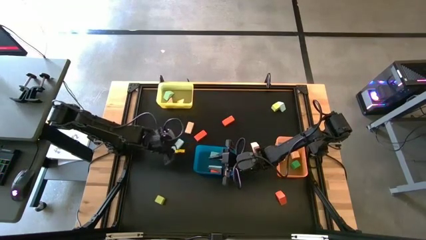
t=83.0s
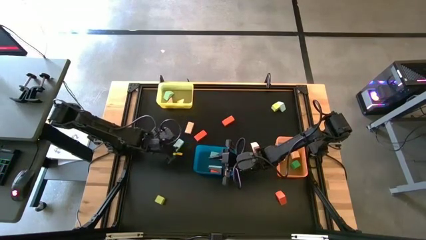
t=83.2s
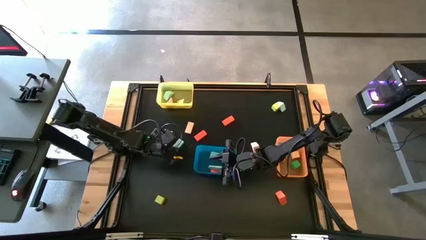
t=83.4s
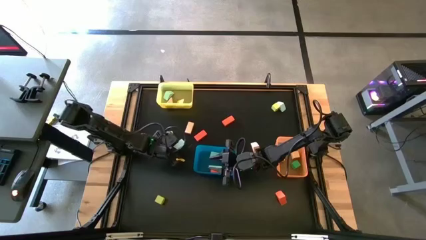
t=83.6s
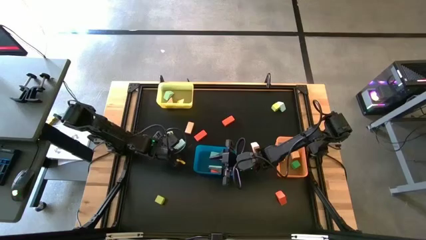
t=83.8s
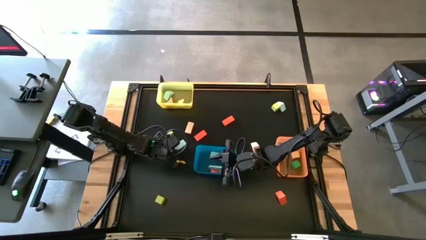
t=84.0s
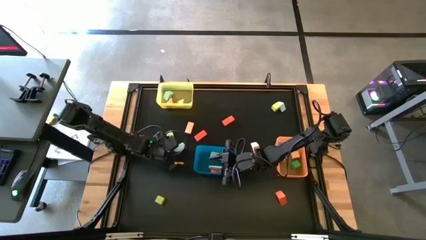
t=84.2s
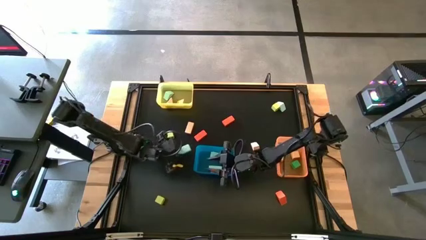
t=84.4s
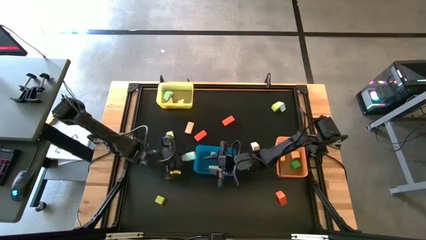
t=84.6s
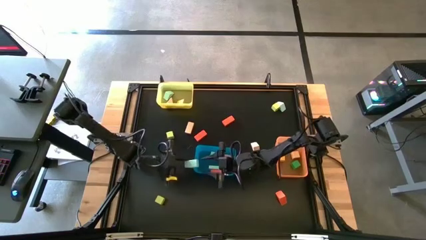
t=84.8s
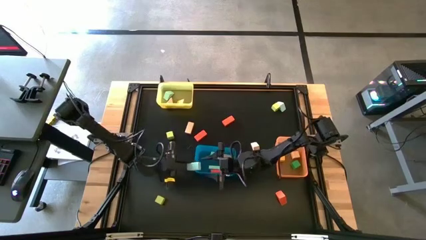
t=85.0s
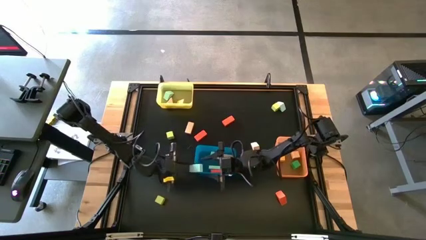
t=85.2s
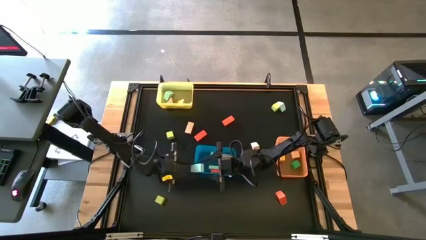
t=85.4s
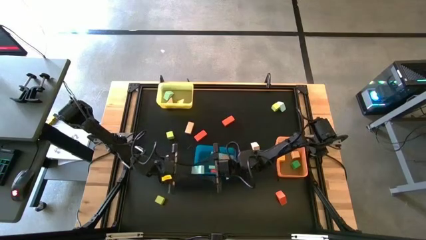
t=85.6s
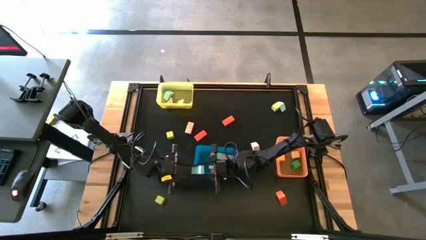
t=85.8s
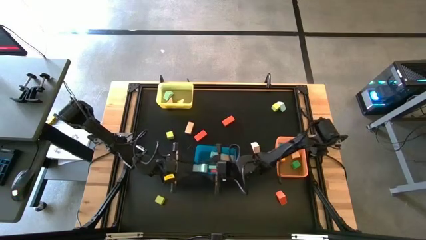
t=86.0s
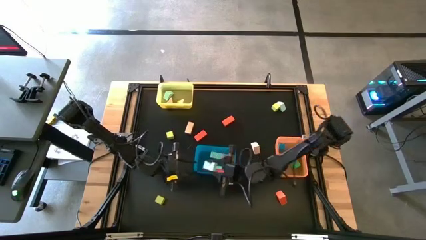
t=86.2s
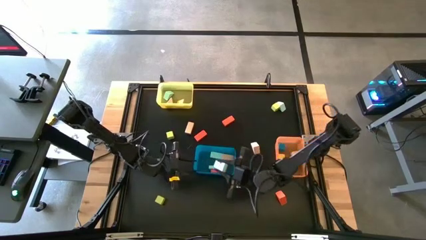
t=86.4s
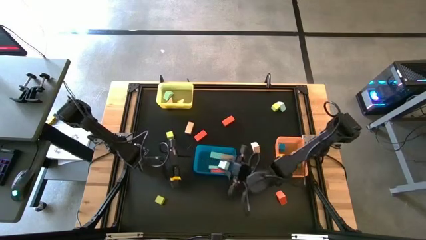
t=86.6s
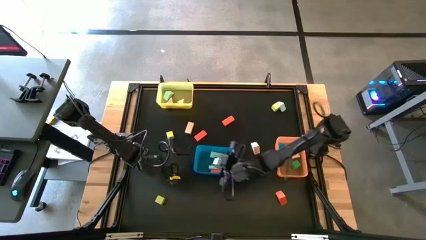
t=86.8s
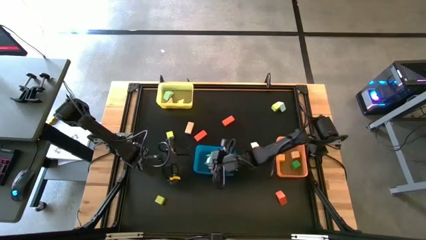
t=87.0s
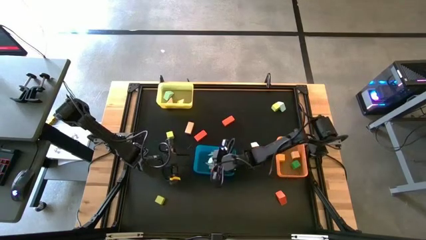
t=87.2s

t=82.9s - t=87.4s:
Task: Sort blocks by size
Put the light blue rectangular block into the blue bin

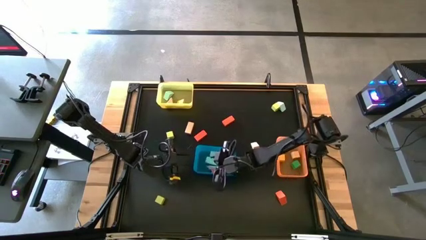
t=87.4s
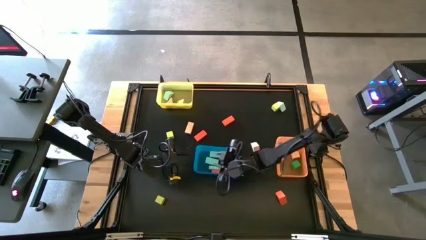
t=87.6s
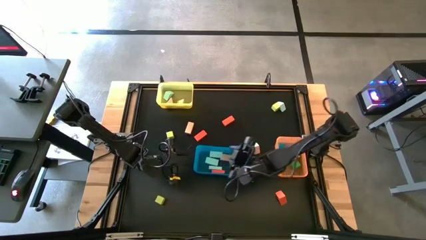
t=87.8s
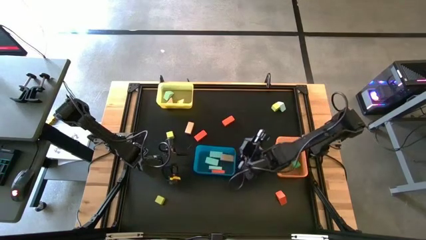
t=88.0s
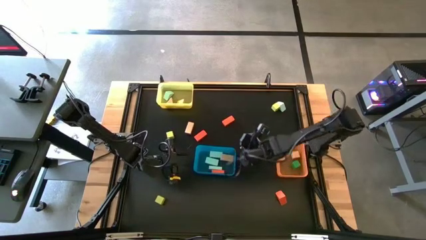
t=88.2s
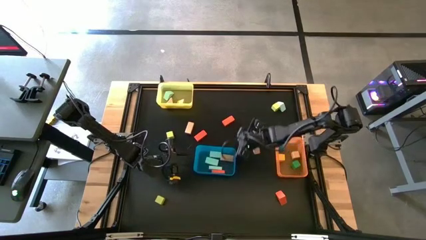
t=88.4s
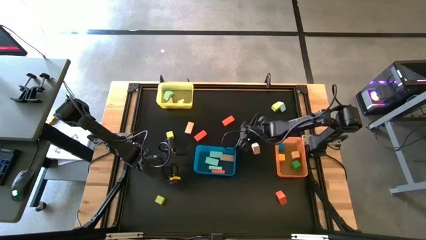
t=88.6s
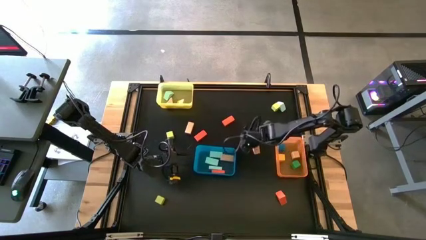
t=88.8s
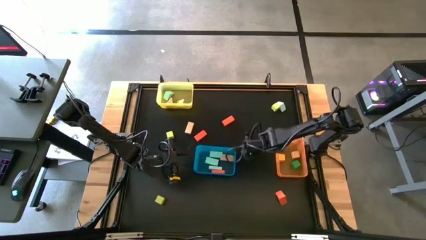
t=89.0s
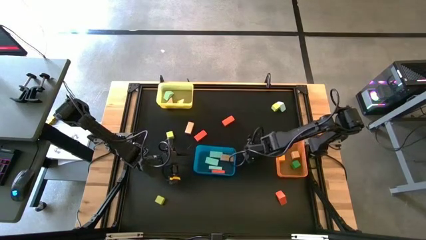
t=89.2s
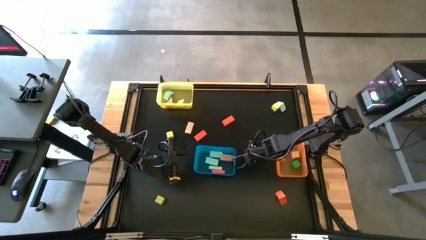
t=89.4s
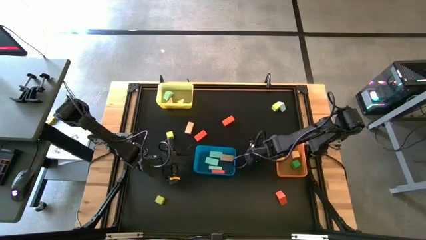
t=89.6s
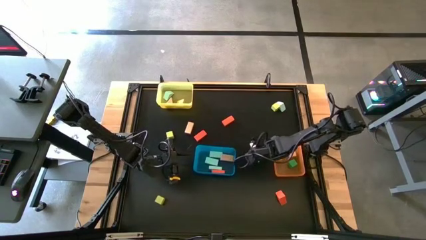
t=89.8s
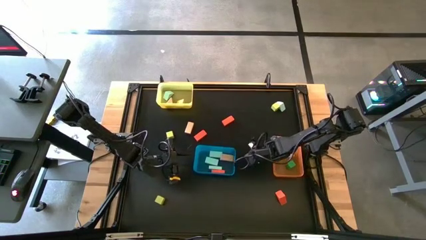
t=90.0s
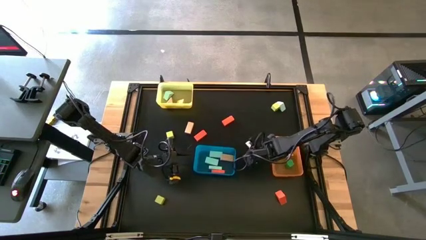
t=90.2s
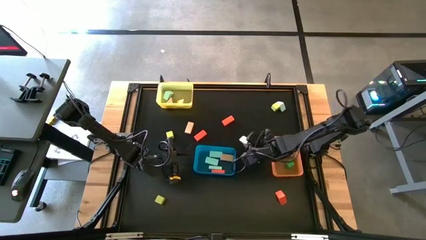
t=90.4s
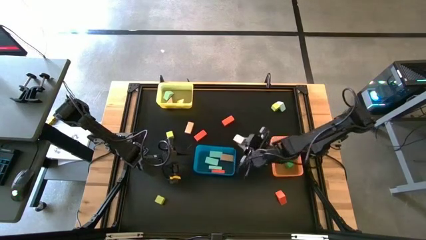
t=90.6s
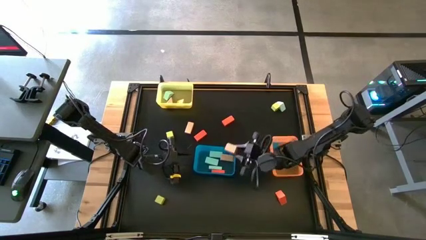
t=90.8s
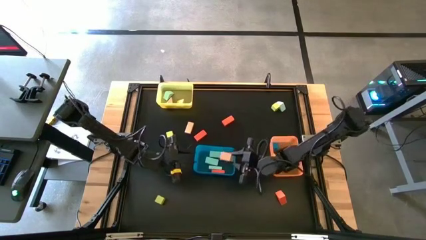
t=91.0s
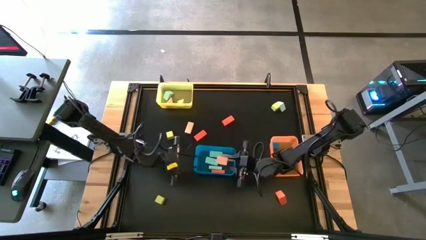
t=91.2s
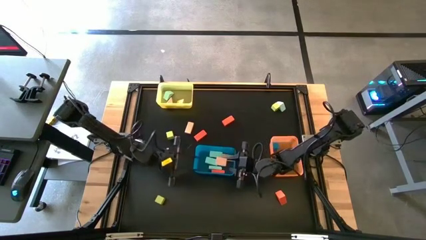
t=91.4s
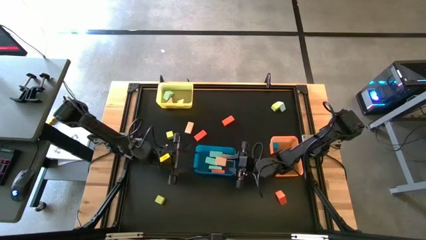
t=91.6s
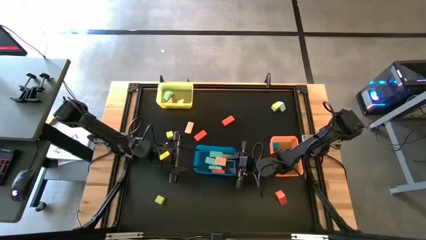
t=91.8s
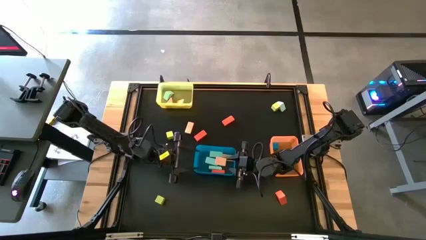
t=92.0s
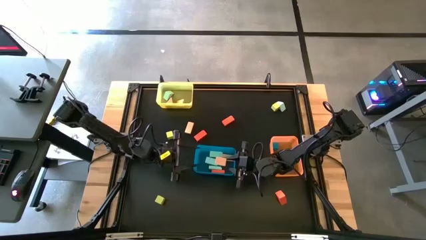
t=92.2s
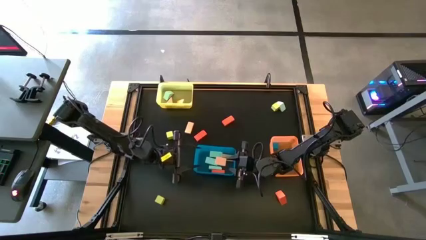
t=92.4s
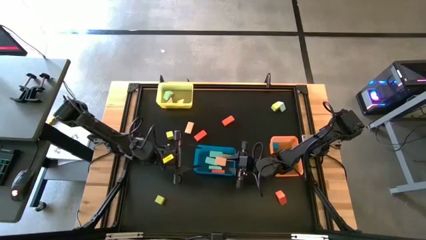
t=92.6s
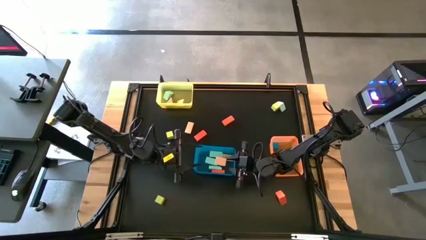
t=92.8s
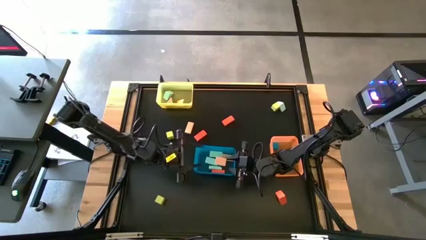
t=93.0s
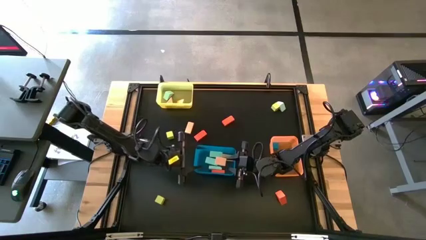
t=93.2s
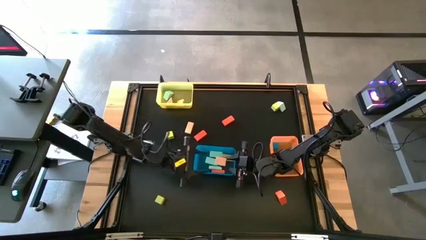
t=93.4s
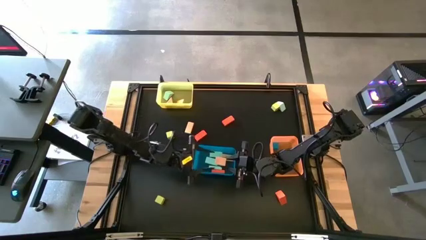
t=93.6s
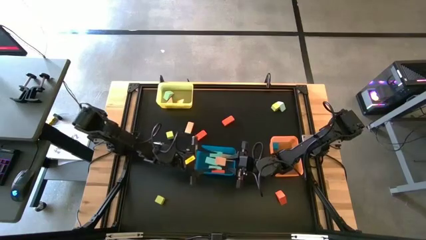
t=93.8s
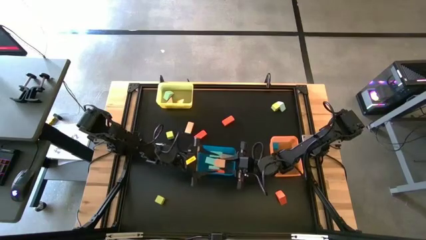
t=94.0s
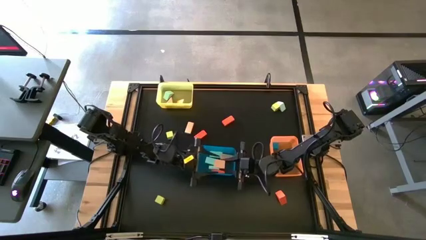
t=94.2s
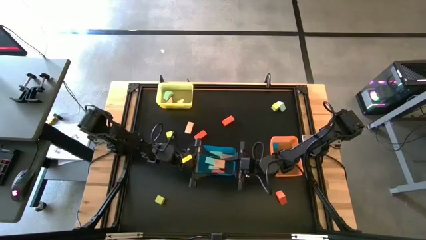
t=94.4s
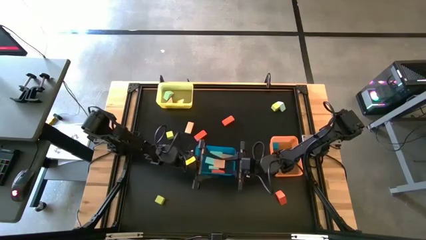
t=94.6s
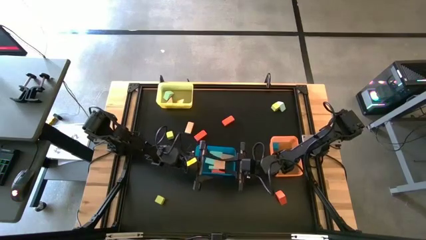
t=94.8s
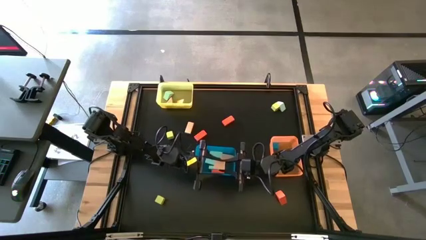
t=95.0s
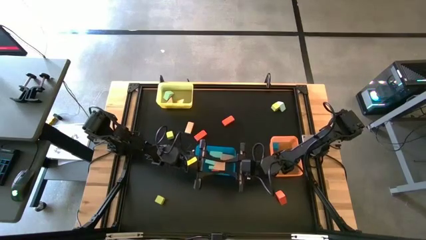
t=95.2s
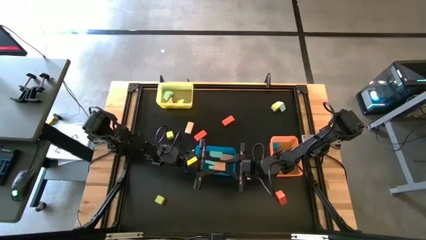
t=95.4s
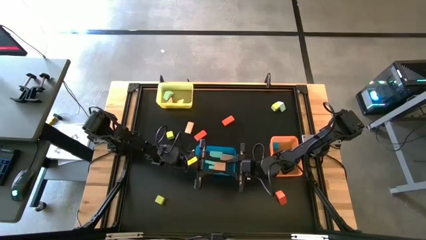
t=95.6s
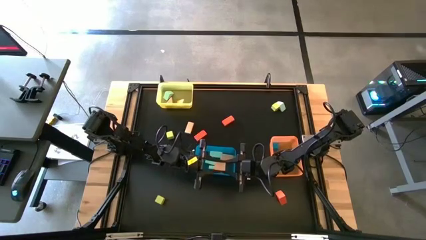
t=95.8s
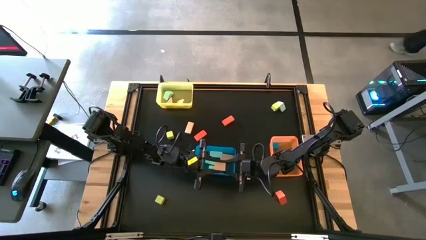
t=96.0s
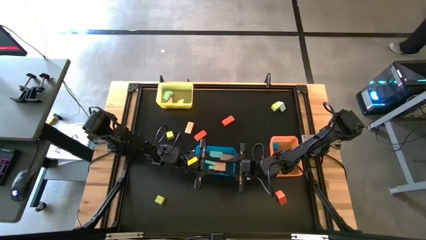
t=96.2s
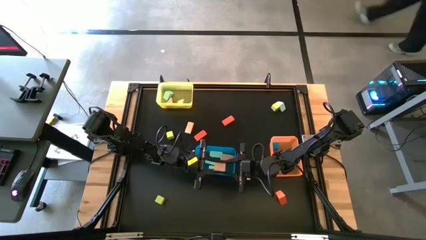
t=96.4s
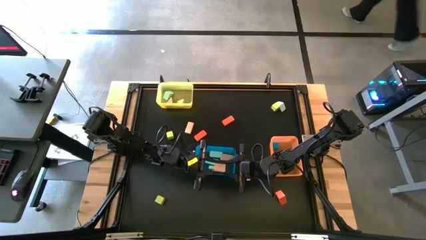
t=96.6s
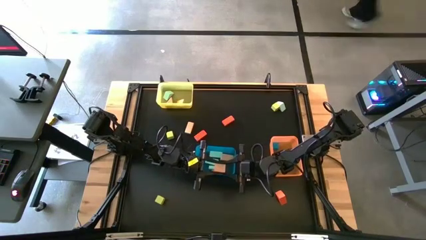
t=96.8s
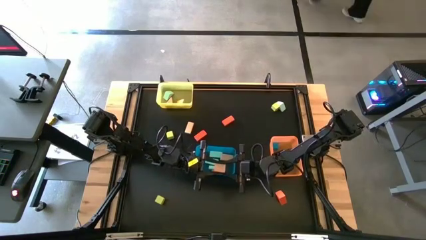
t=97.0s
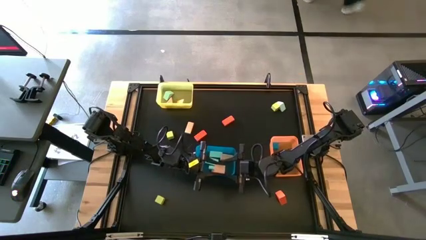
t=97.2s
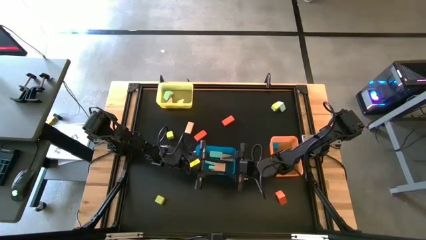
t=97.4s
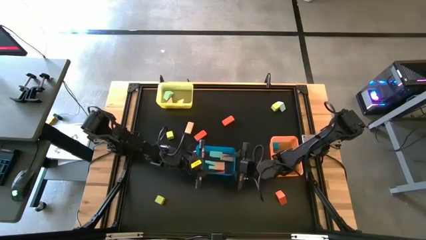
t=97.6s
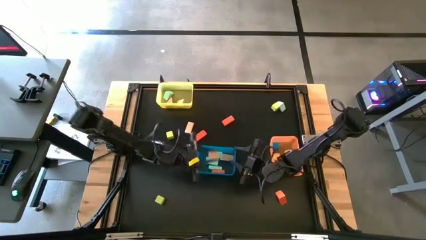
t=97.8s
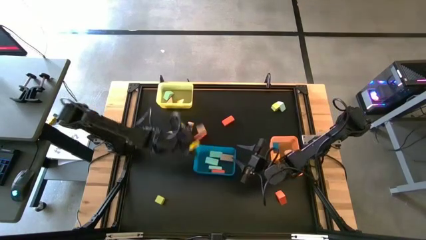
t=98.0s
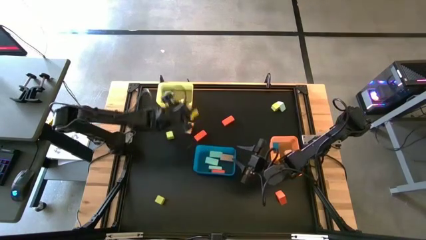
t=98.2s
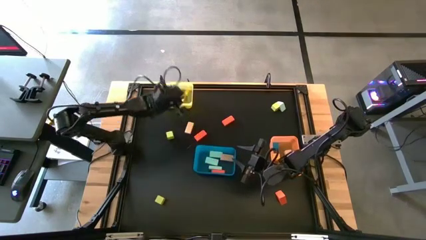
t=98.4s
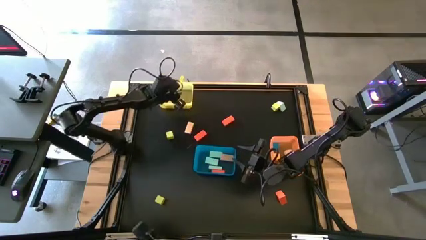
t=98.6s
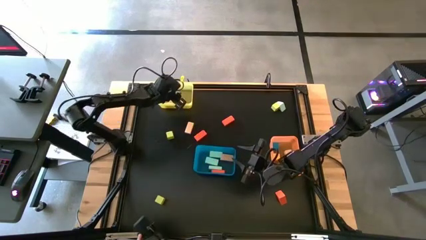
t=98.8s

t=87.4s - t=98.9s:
Put the light orange triangular block into the yellow bin

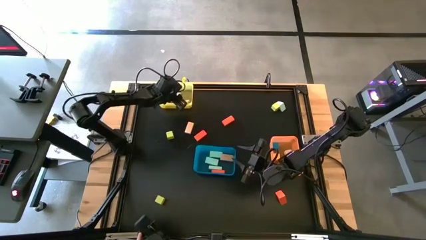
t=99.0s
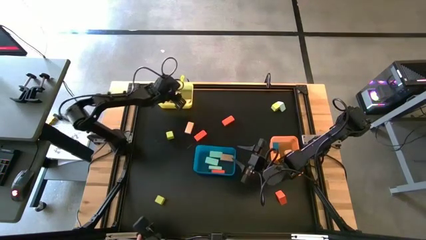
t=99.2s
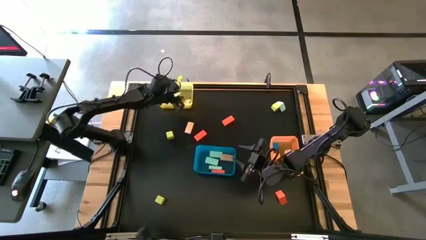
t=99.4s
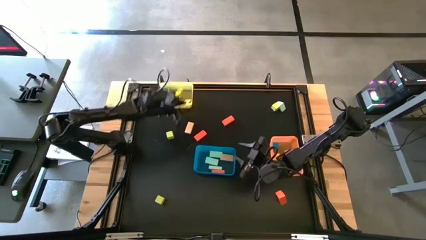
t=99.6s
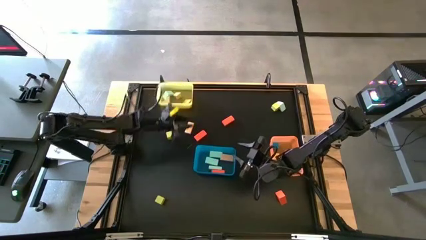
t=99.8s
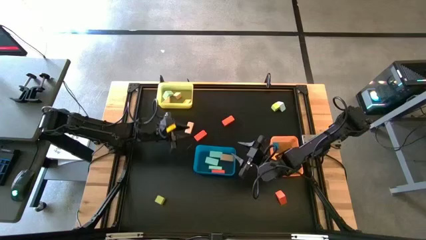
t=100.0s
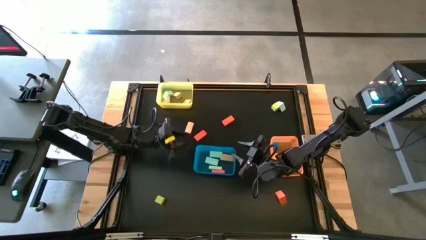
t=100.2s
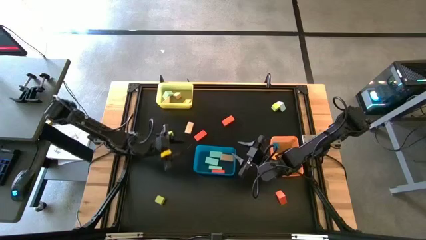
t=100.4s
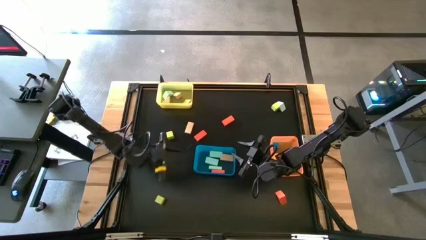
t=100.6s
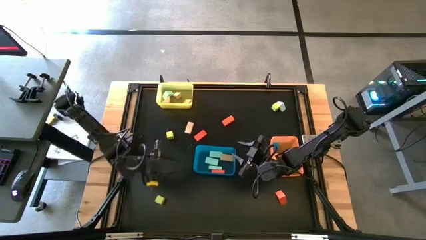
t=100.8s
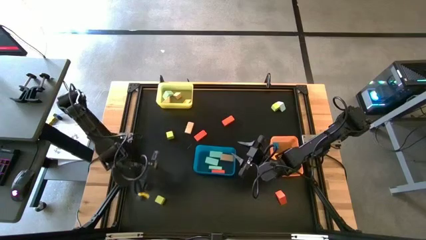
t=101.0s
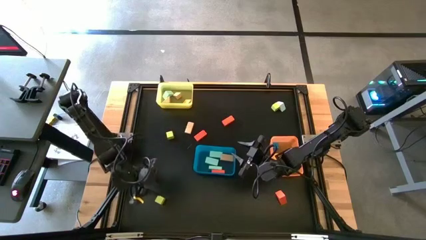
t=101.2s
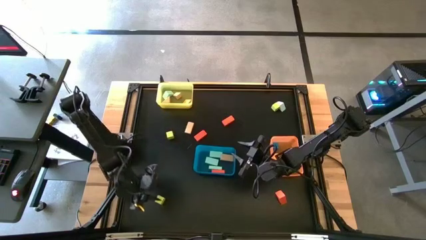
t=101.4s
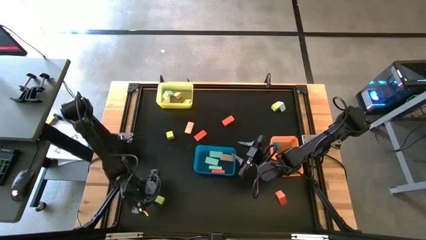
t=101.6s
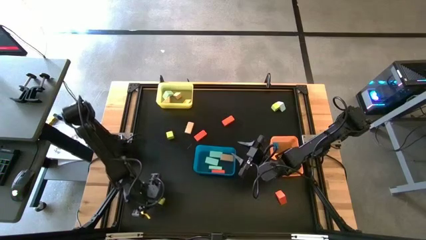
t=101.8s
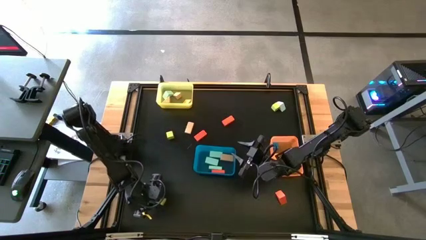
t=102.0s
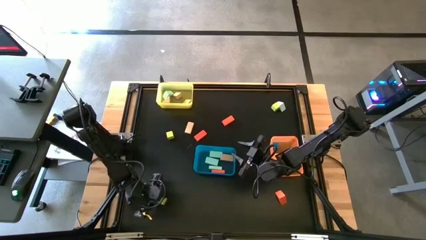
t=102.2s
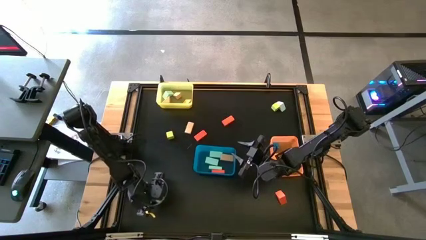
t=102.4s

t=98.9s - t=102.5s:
Put the light green square block into the orange bin
